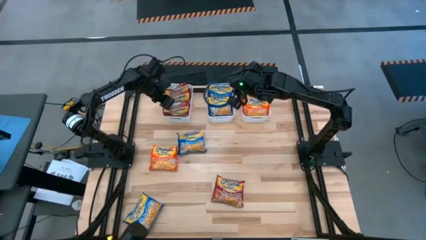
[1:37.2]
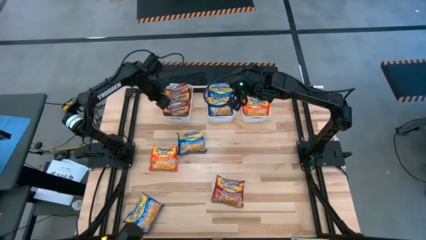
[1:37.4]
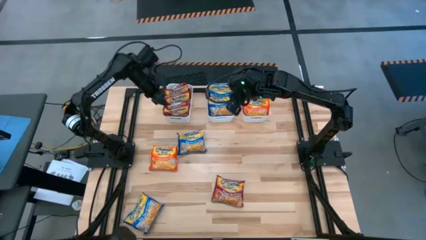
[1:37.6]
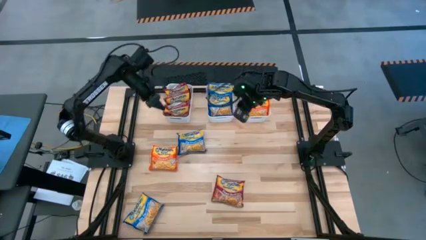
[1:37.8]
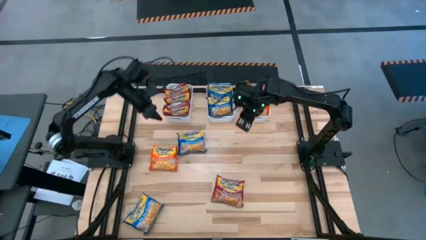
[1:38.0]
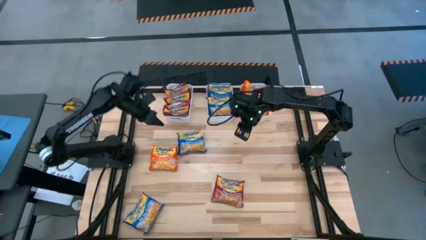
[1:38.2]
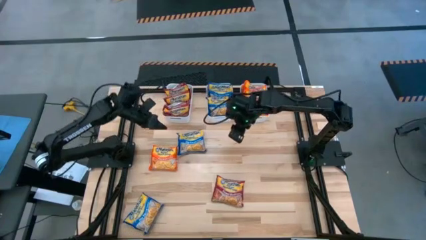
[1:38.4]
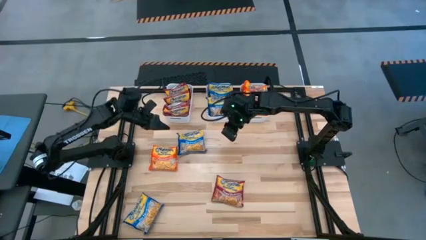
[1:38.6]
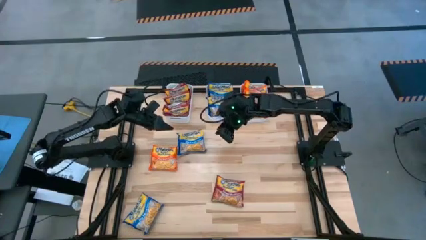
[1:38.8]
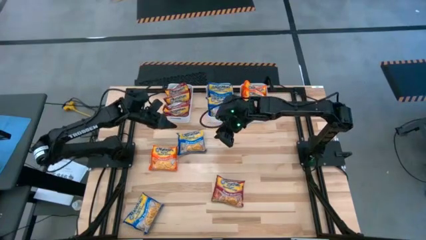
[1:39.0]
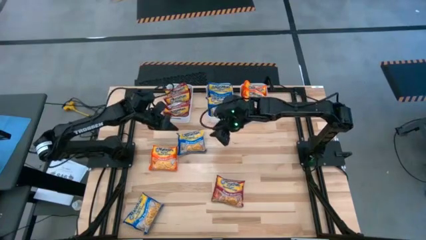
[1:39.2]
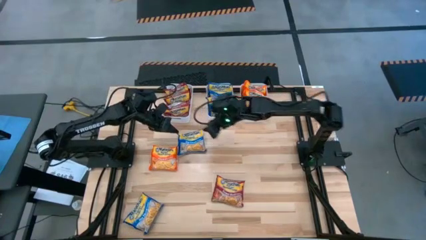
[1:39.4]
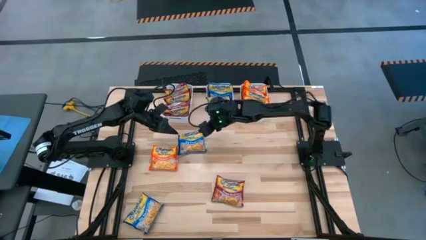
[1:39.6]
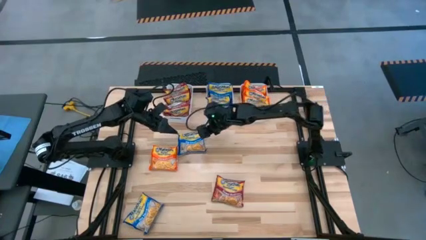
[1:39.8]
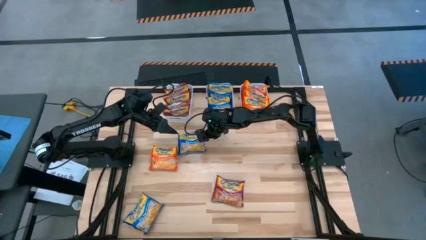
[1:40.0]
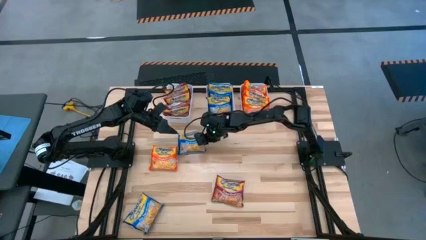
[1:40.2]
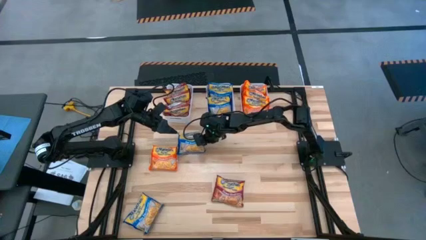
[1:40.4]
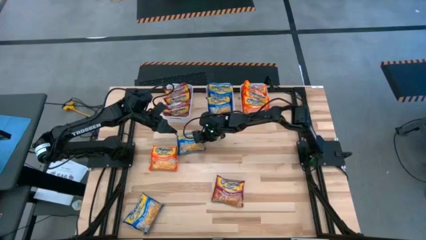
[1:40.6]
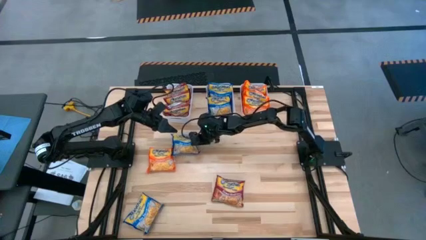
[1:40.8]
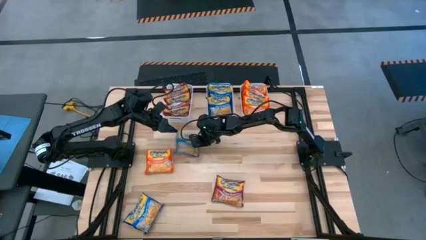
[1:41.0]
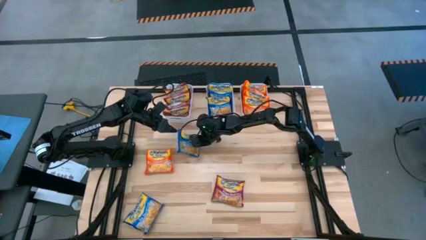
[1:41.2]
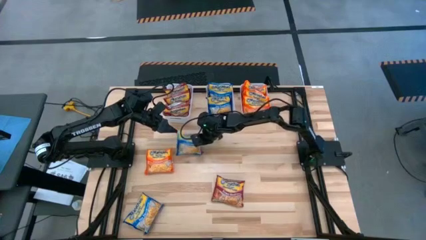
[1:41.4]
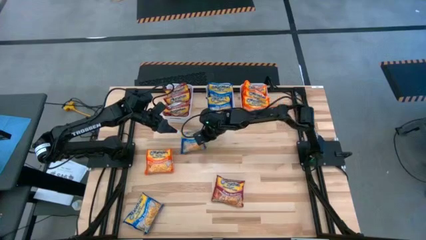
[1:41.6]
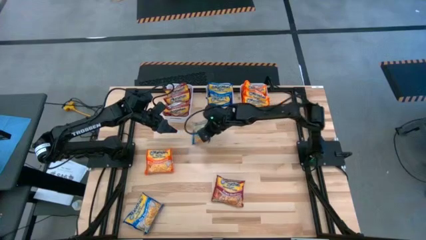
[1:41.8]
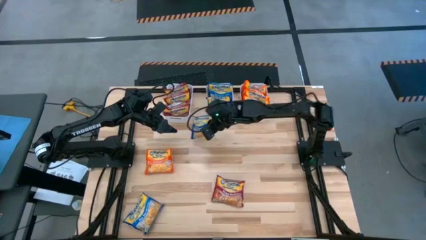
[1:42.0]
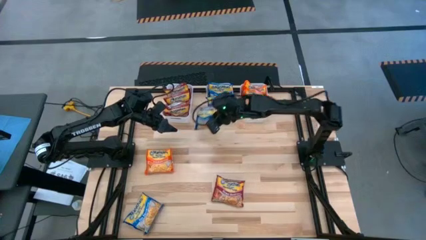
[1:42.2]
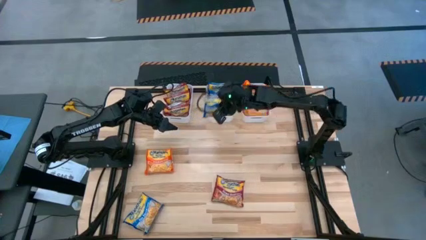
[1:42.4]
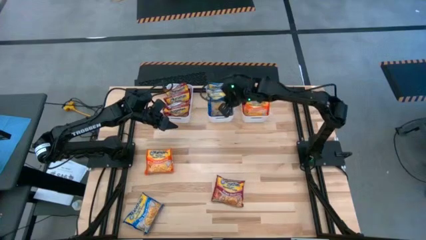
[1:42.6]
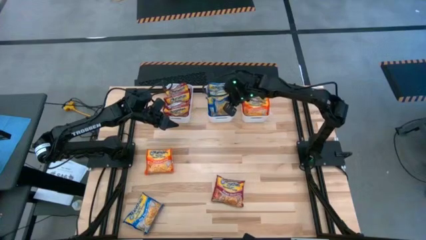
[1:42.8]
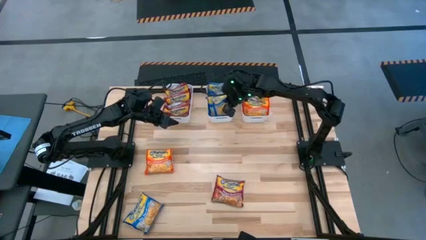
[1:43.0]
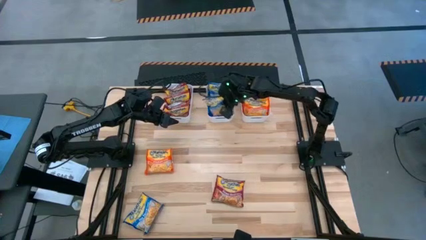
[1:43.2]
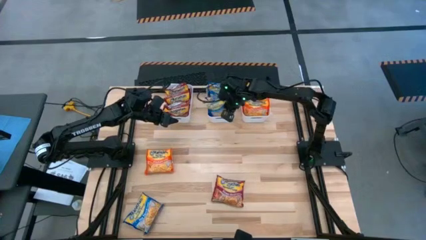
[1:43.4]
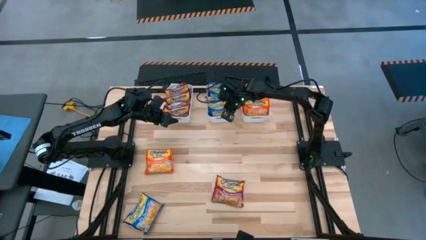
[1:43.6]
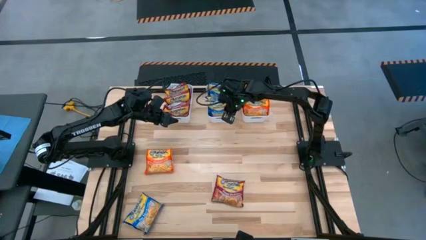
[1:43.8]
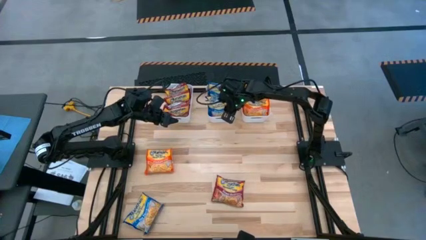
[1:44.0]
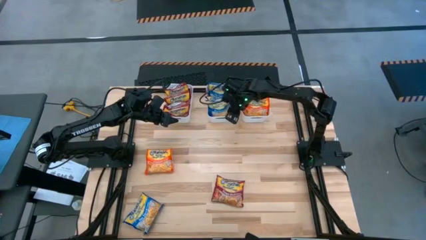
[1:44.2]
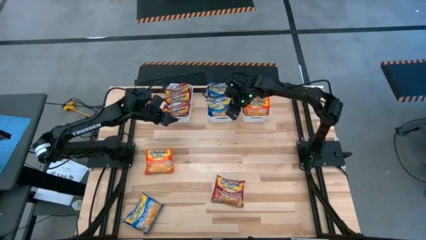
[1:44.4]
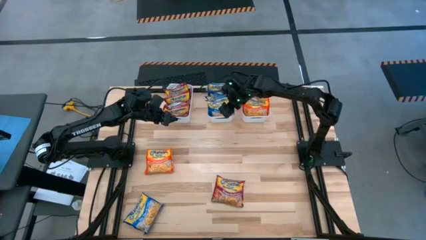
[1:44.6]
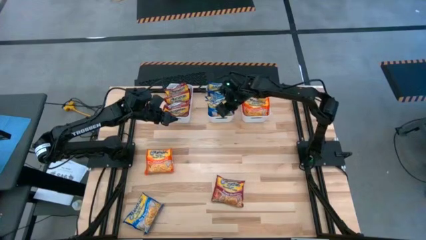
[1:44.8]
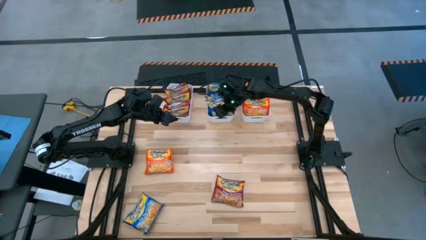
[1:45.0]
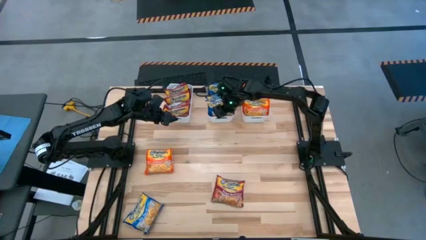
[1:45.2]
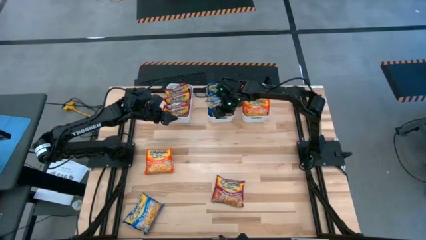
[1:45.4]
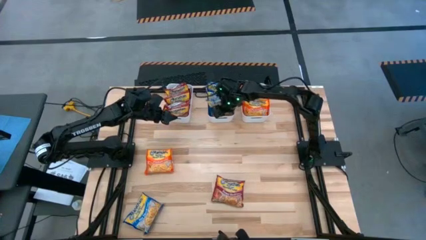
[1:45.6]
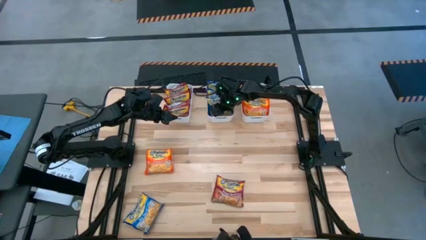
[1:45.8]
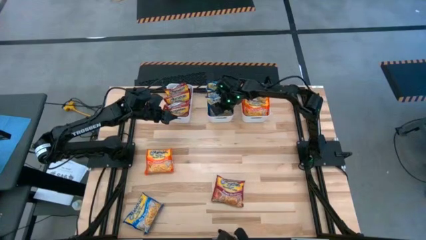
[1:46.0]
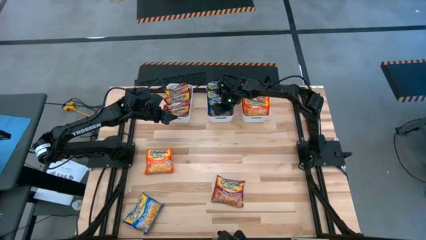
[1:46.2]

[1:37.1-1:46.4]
Task: Sort Maruchan noodles
Put the top blue noodle pack into the top middle white bin

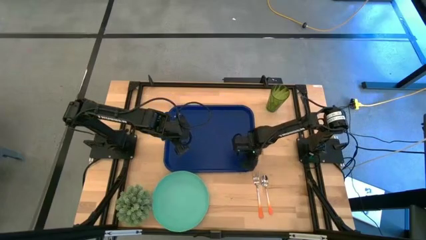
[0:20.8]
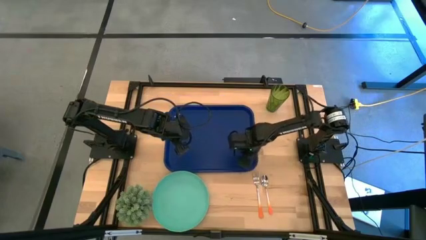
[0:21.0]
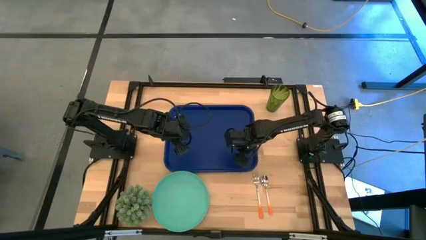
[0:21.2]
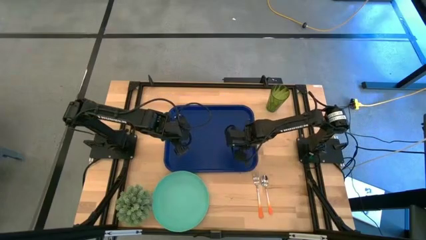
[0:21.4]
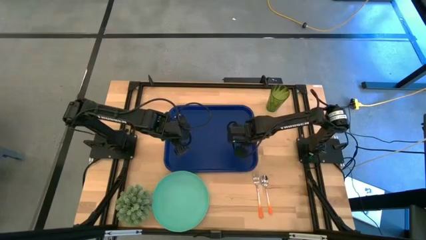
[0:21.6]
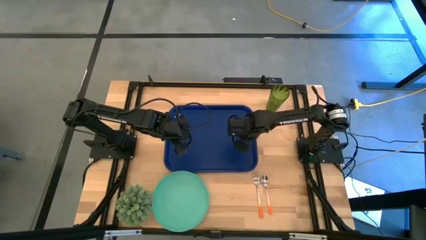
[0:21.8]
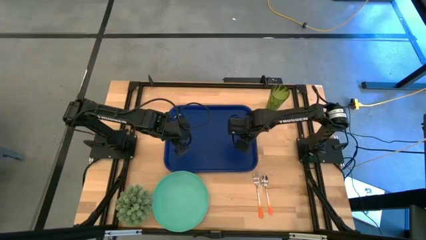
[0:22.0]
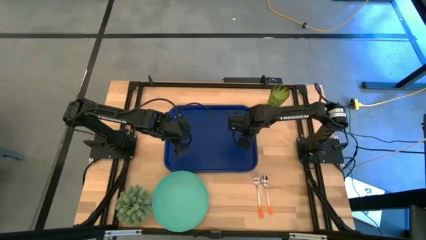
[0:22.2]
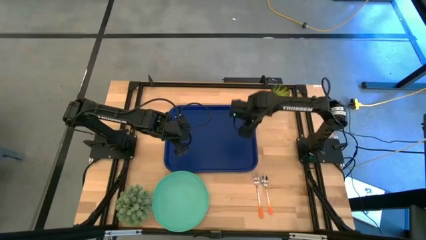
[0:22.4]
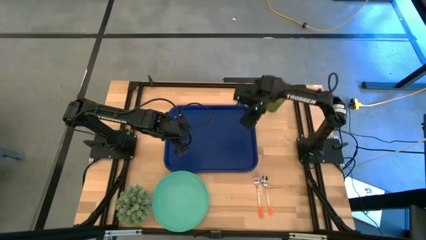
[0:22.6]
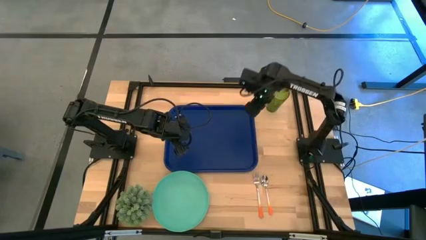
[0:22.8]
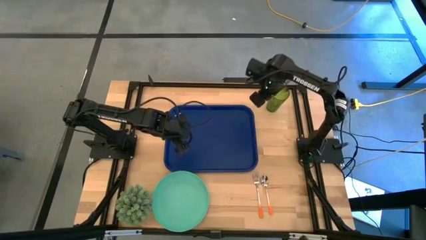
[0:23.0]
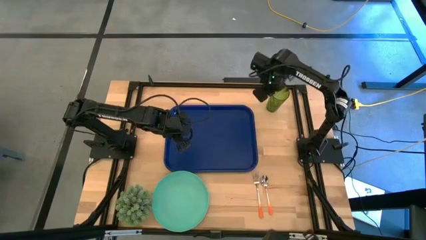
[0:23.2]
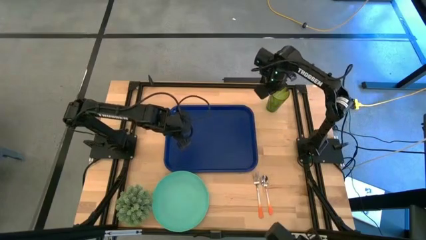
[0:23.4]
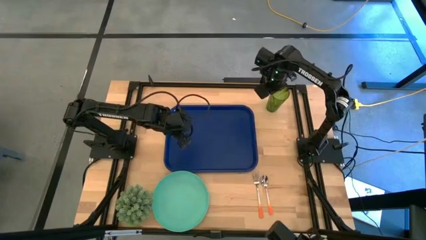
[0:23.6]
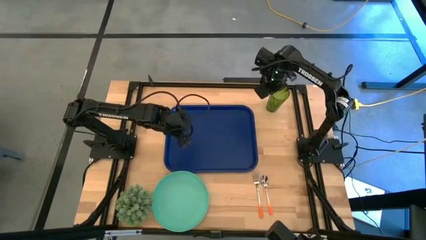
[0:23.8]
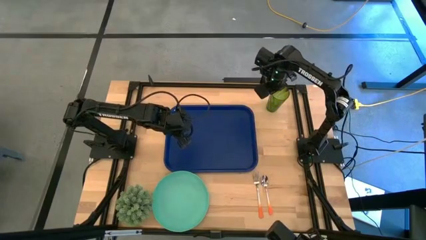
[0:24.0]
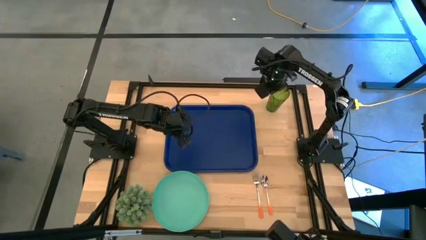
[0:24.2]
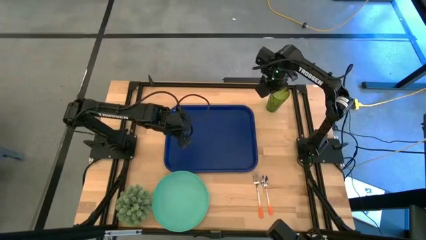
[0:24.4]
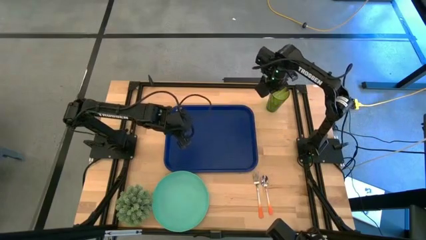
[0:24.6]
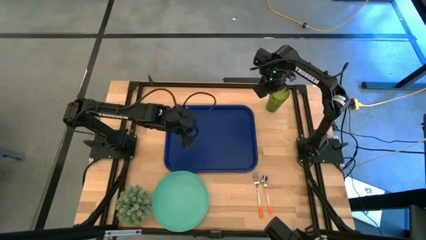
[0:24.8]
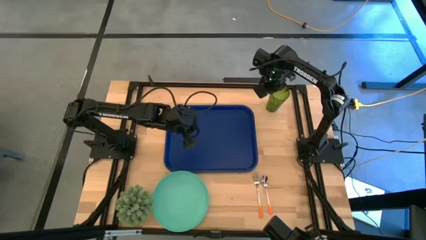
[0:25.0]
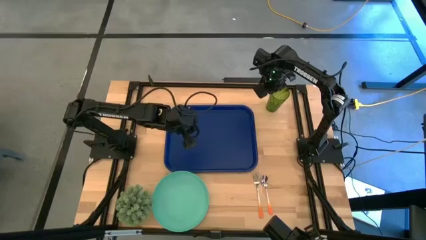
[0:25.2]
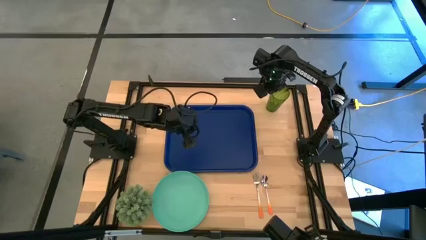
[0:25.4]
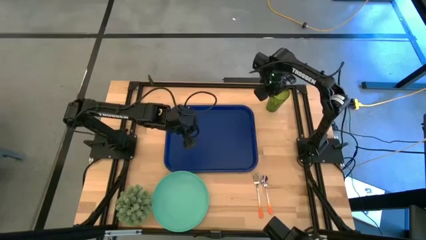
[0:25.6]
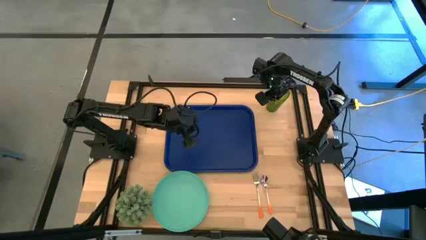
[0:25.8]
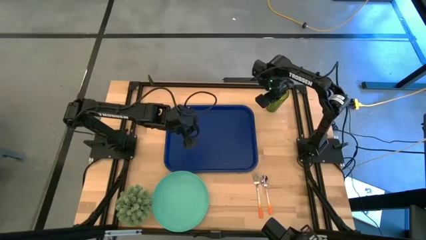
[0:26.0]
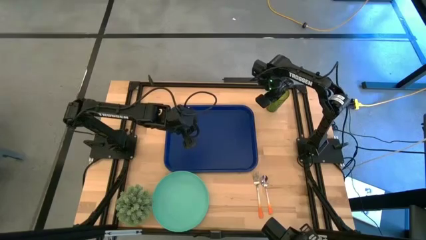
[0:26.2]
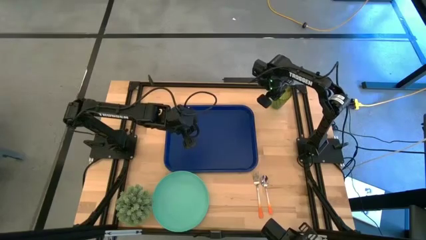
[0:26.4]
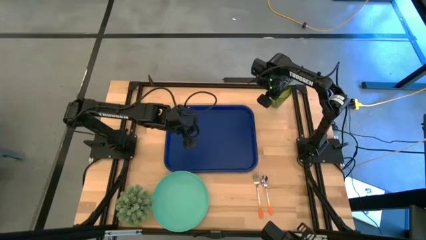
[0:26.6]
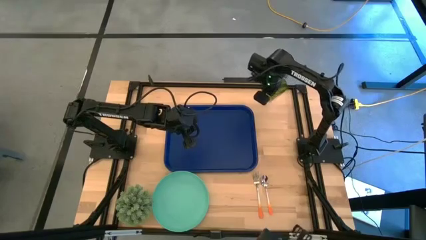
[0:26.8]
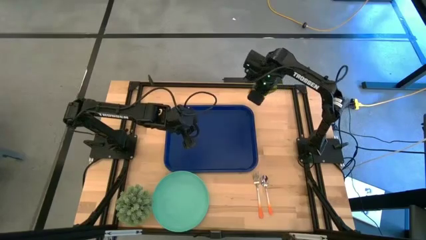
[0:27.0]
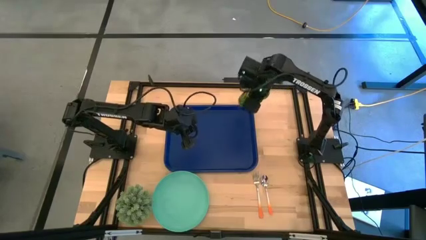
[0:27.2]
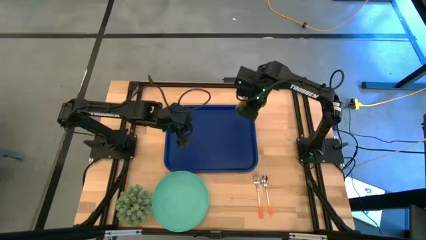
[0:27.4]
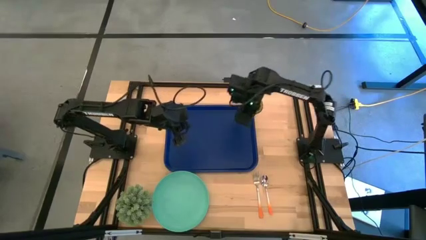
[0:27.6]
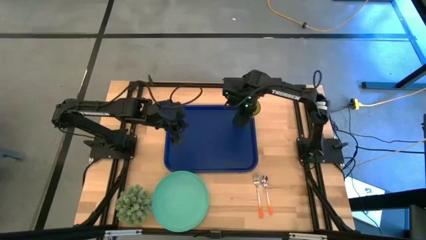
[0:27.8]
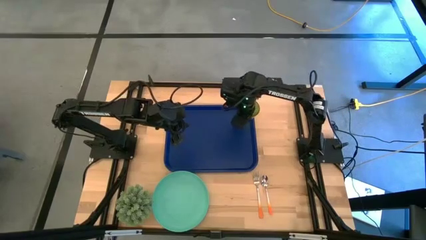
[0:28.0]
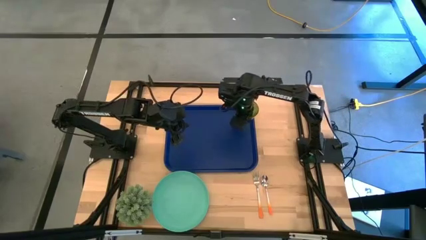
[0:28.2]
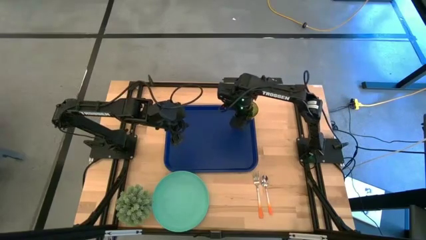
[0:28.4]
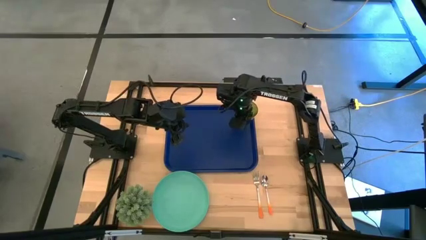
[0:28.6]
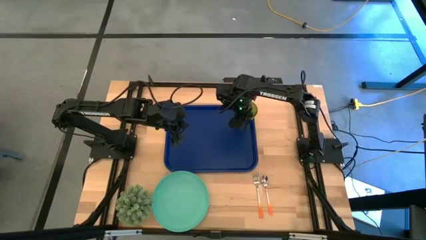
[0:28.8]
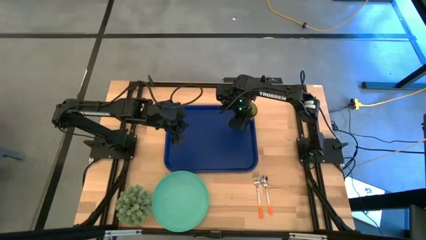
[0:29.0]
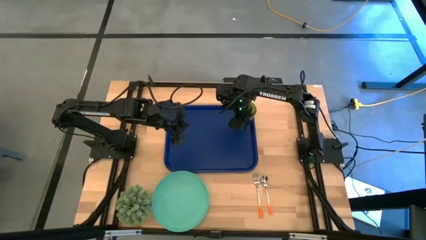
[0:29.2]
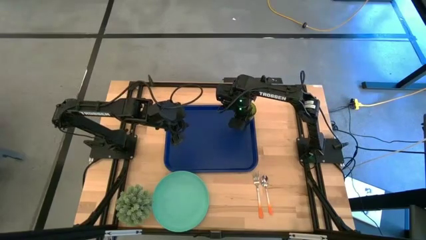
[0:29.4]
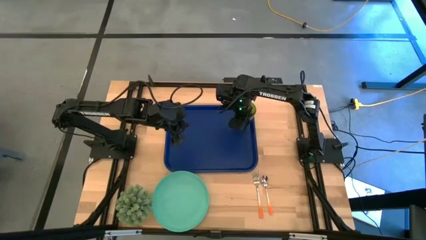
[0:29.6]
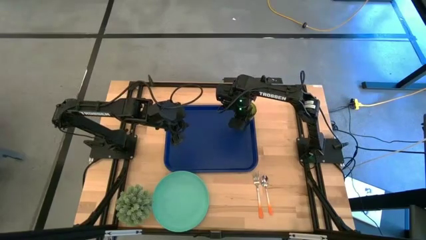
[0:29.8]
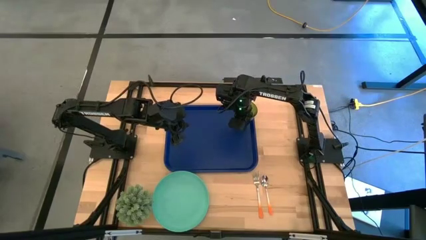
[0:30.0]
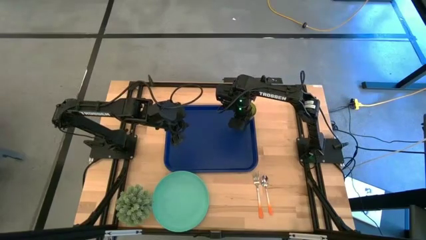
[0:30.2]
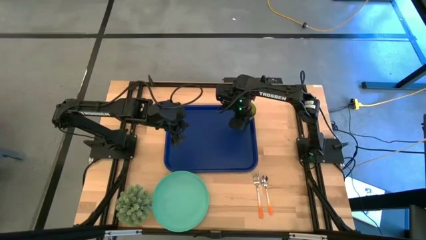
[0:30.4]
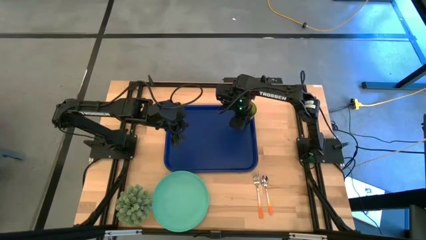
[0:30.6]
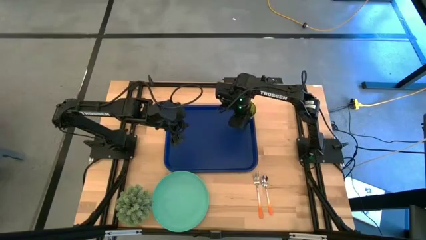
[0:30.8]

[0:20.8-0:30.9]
Task: Pick and place plate/cup/fork/spoon on tray
Put the red cup on the top right of the blue serving tray
